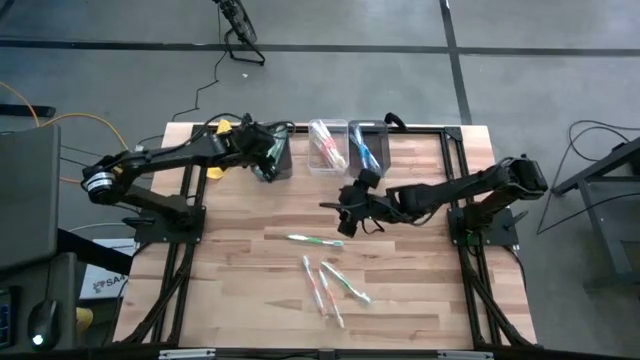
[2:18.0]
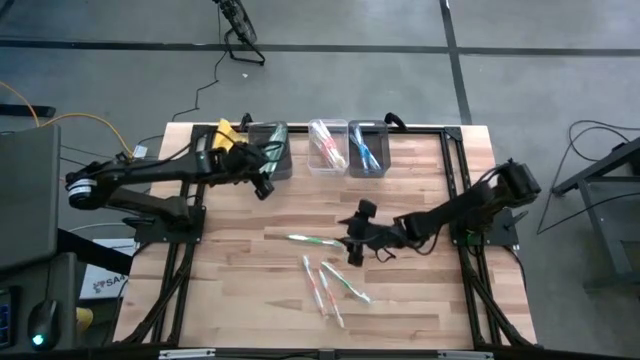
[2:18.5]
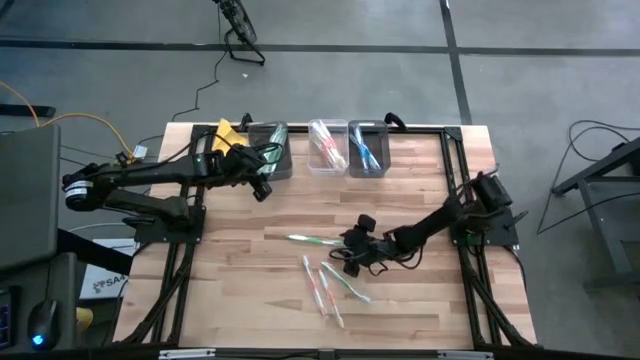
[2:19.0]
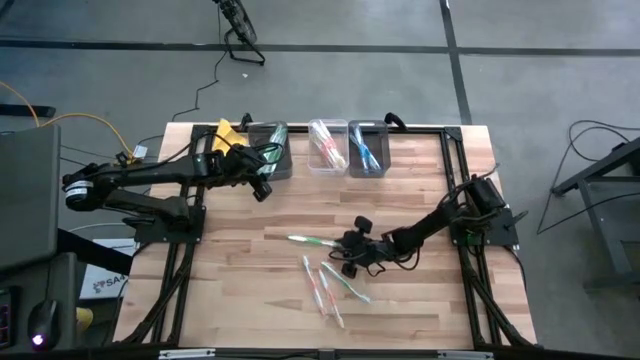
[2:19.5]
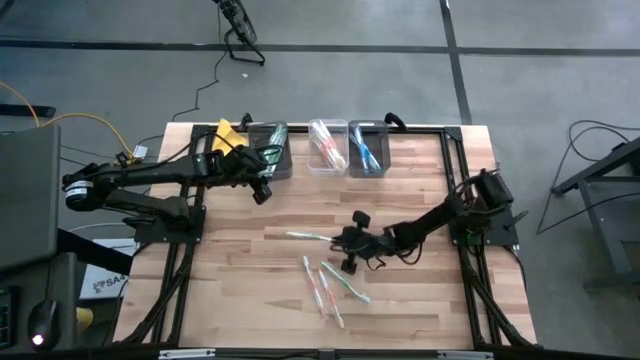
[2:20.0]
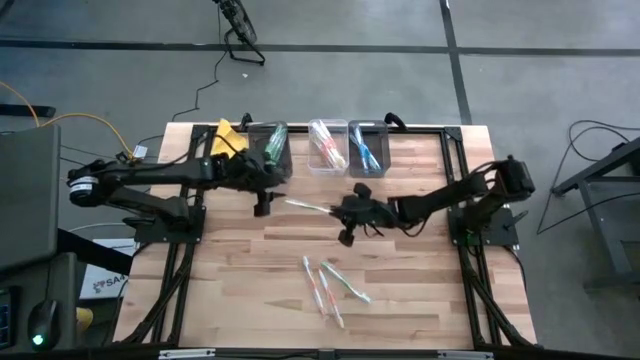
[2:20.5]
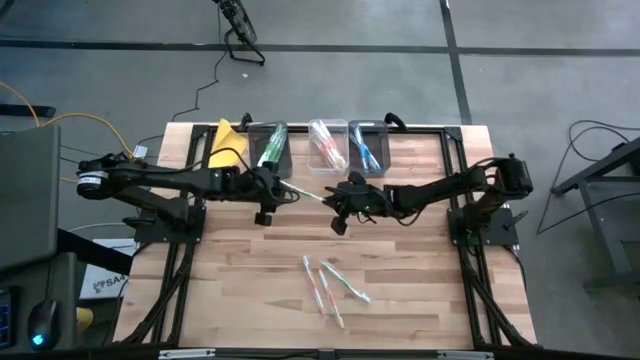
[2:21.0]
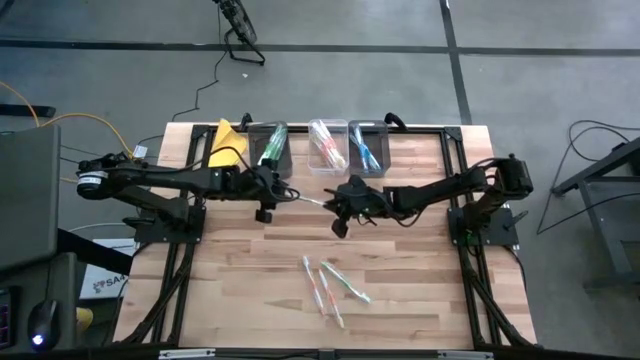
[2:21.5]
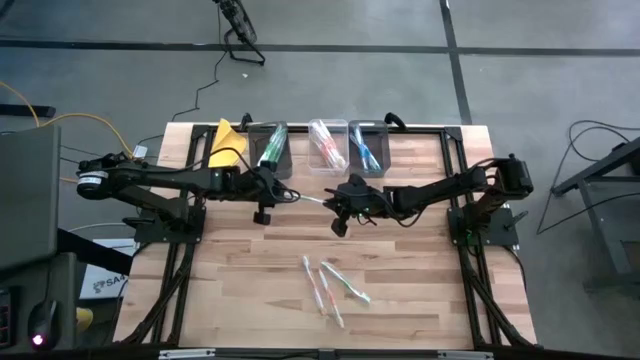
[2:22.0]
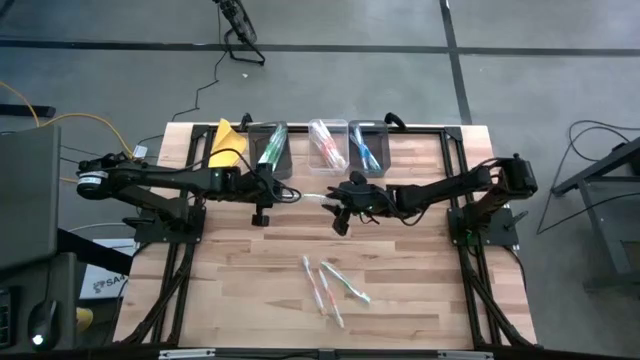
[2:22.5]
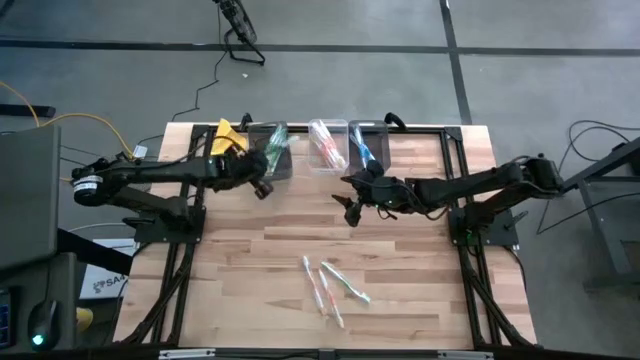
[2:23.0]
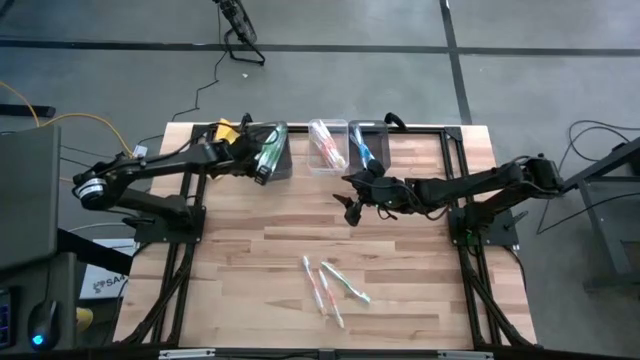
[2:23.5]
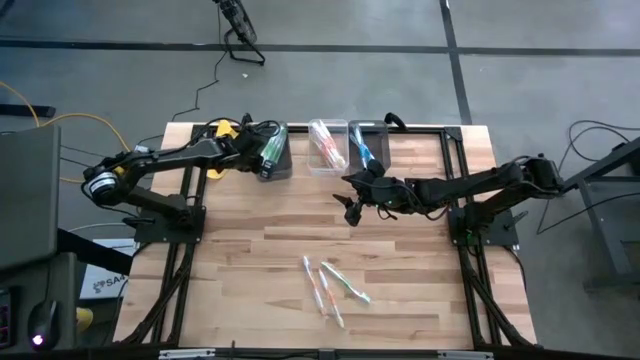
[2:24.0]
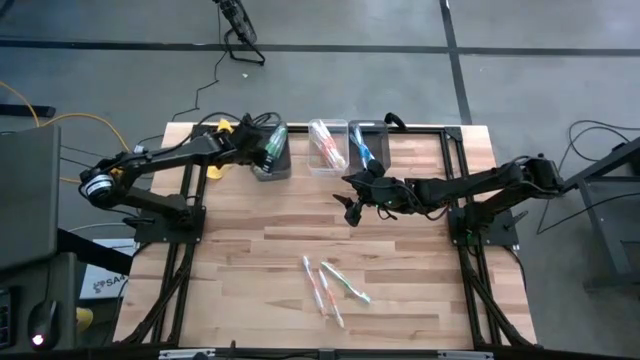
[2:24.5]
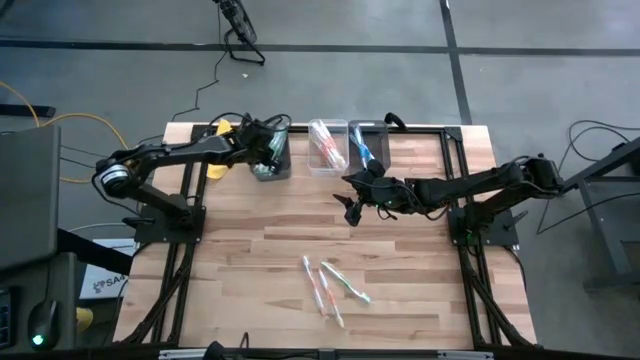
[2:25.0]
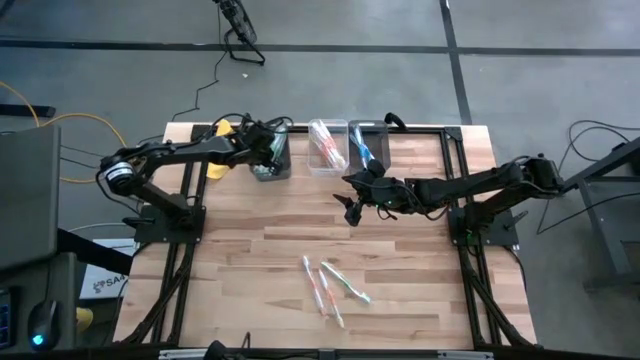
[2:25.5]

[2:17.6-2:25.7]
Task: Pick & Place Toothbrushes
Put the green toothbrush into the left black bin

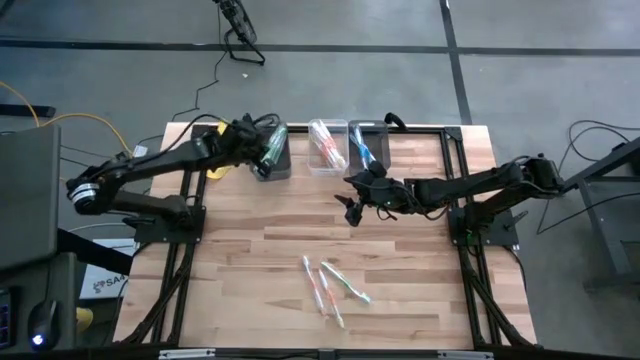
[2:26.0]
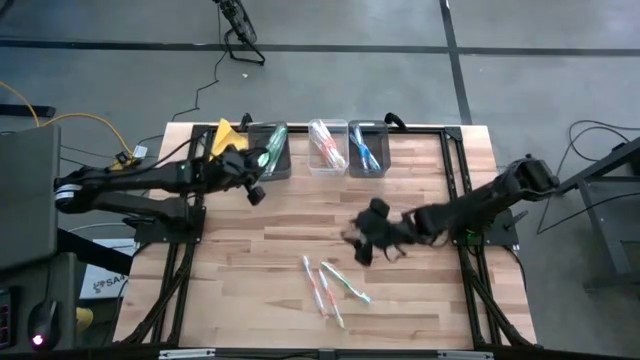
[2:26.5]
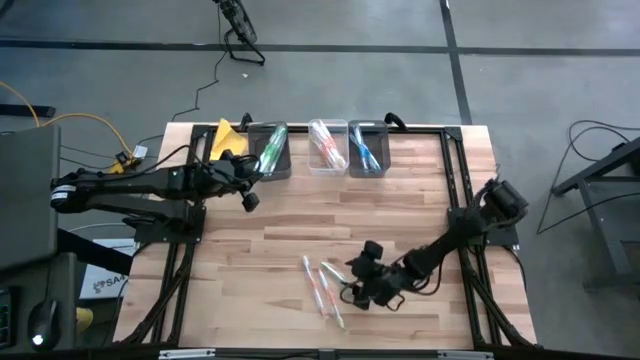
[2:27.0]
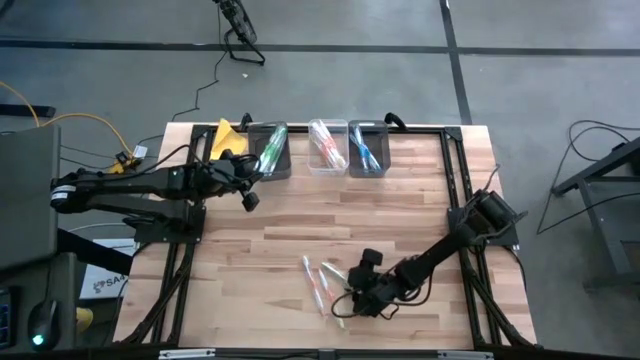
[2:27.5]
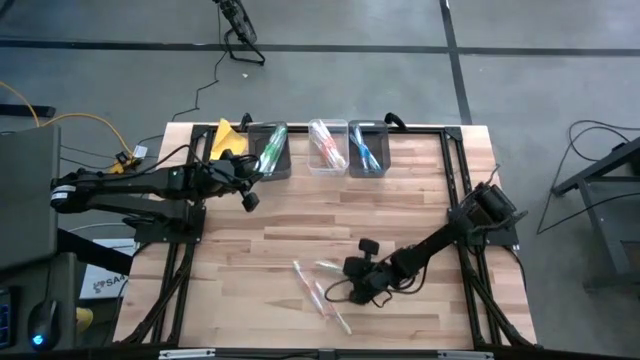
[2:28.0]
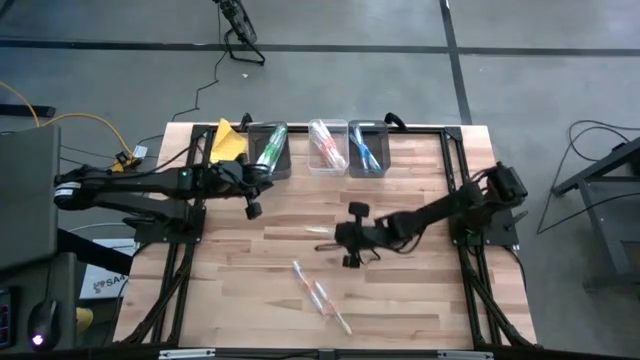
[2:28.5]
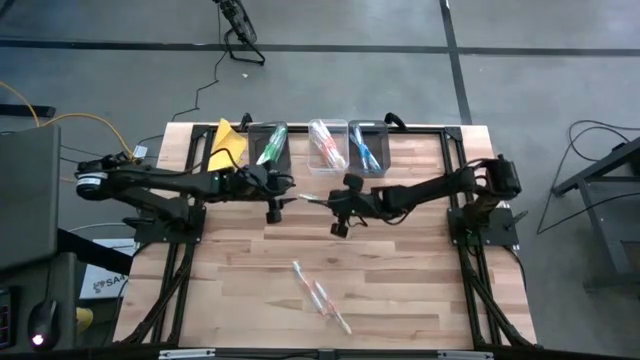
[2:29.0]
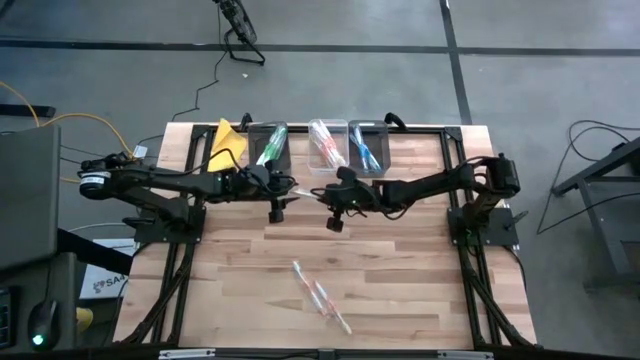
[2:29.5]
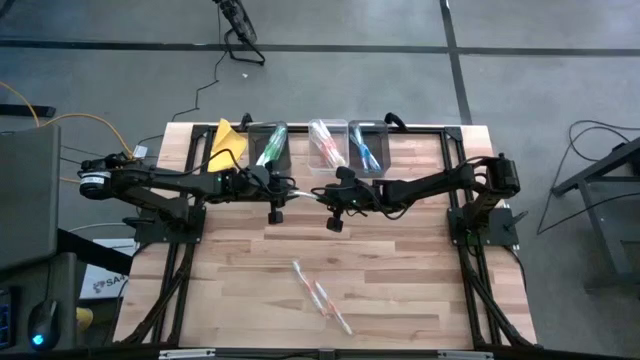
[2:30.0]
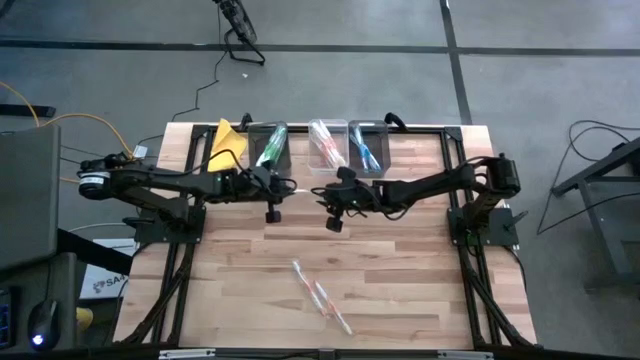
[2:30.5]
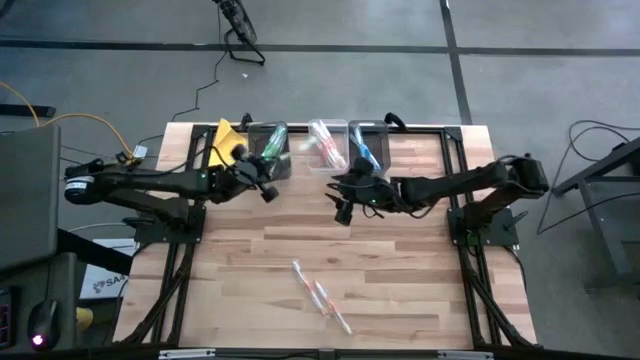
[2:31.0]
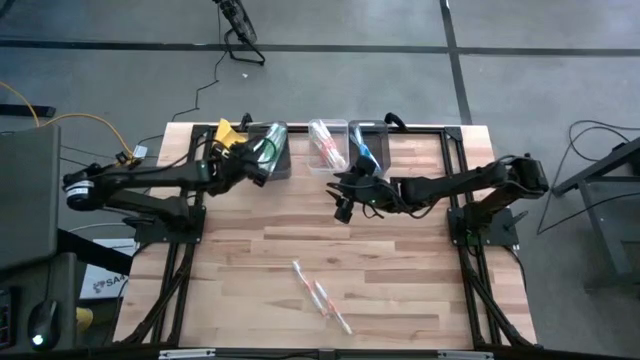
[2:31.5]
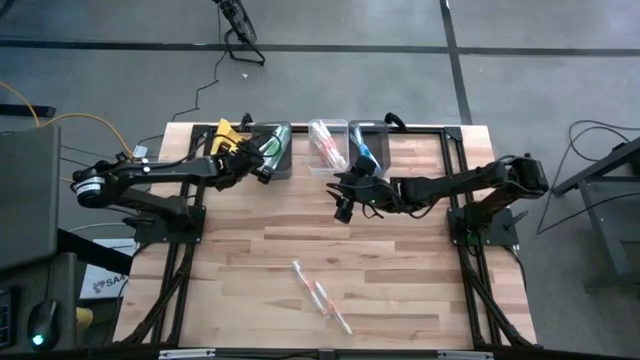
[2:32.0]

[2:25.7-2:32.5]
Put the green toothbrush into the left black bin

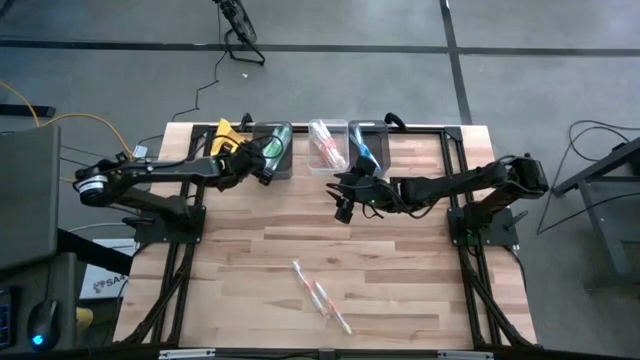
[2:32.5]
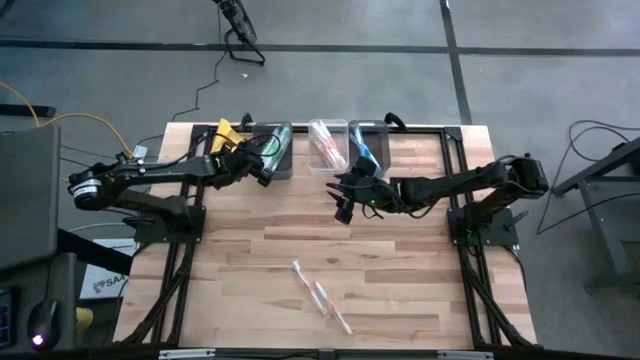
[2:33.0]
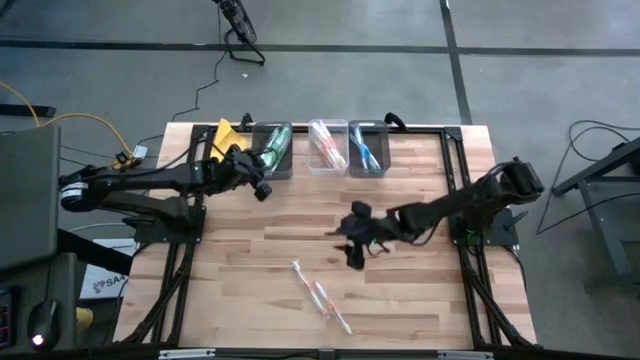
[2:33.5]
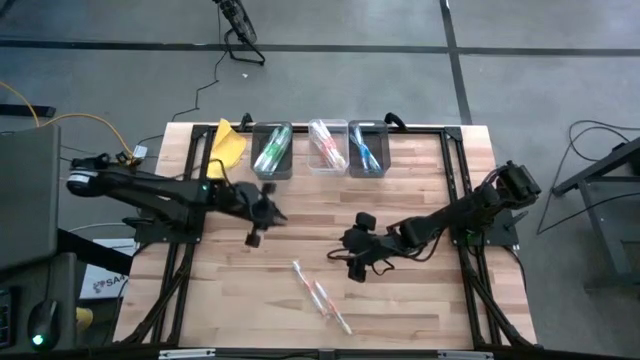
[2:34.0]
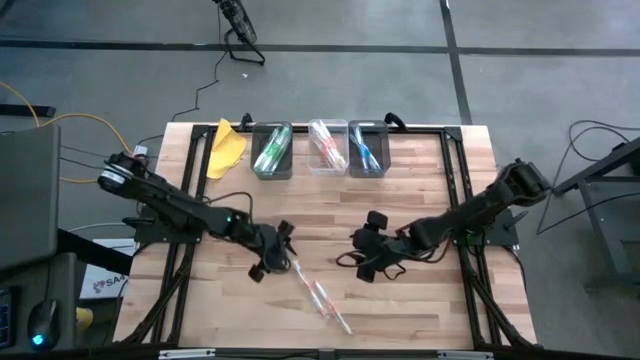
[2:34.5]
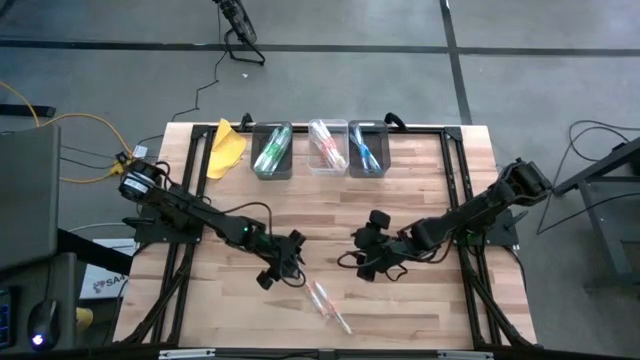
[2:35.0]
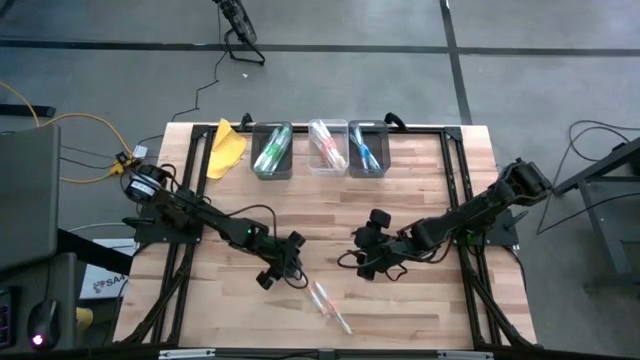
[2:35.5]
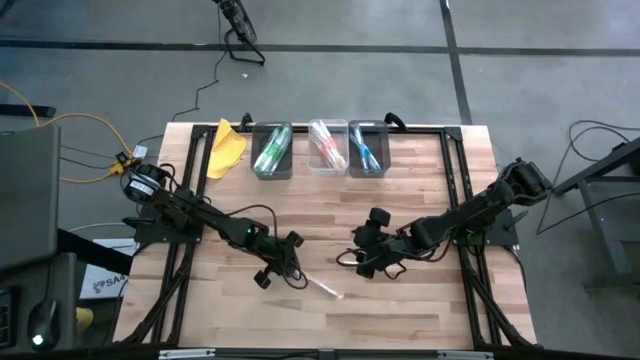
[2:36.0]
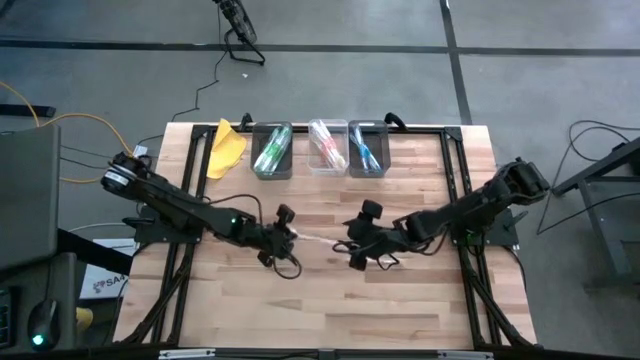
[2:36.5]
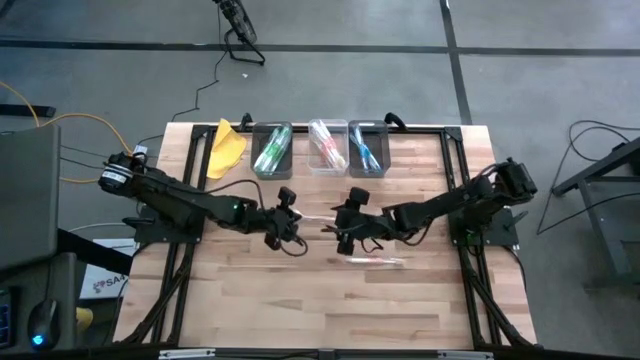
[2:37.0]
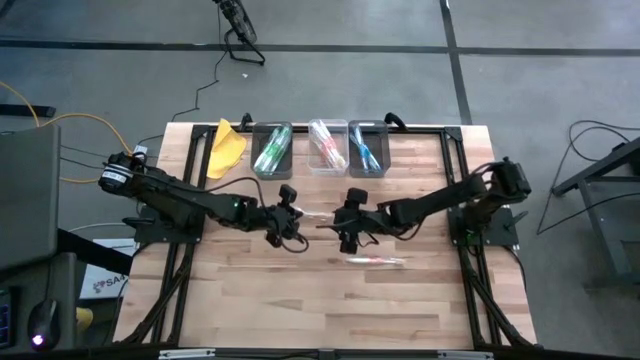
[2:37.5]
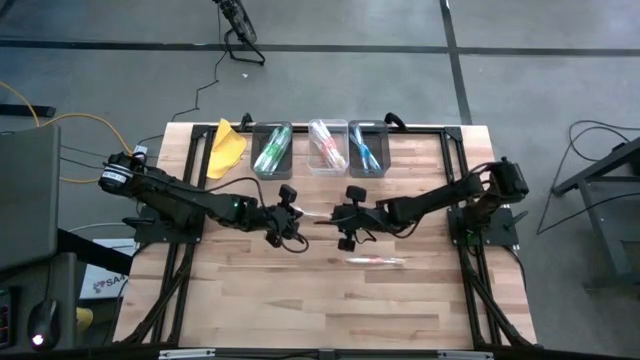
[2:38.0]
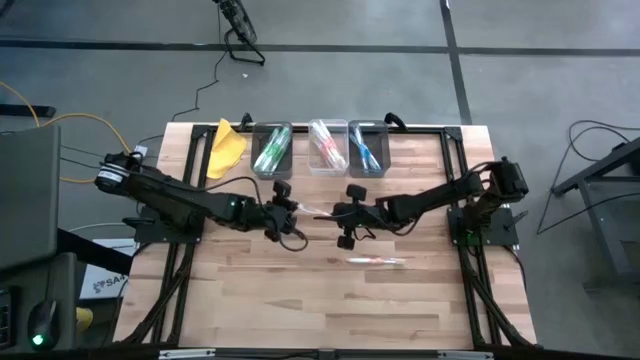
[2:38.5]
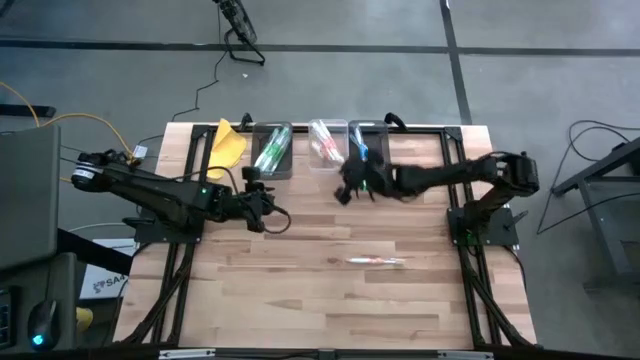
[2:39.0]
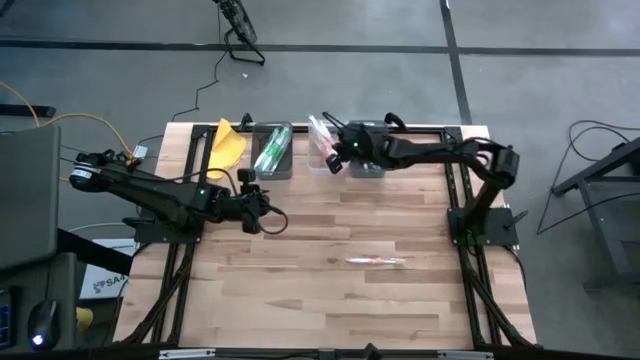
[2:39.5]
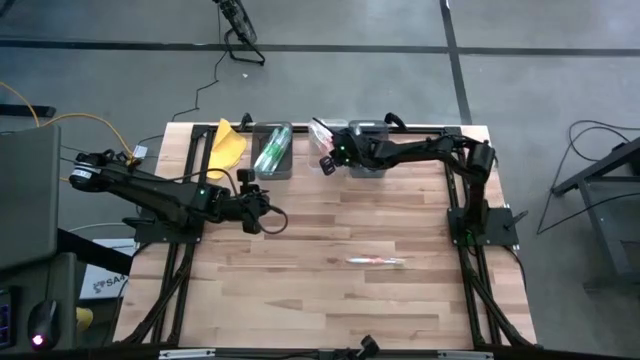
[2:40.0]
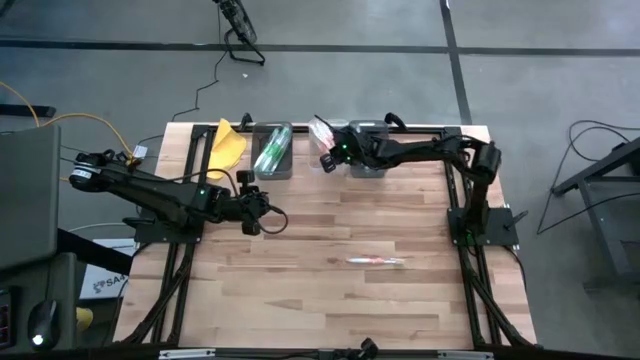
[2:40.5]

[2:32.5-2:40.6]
Put the orange toothbrush into the transparent bin
